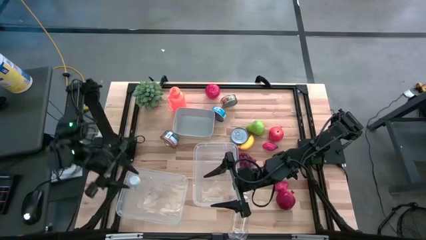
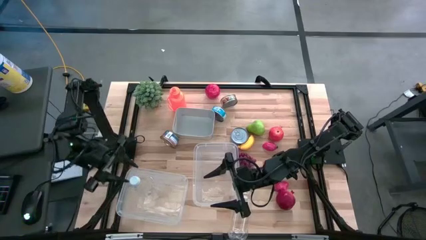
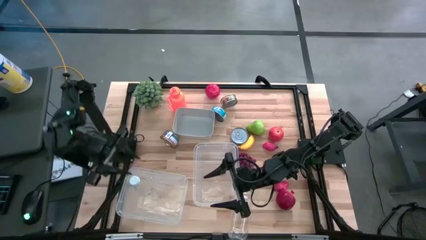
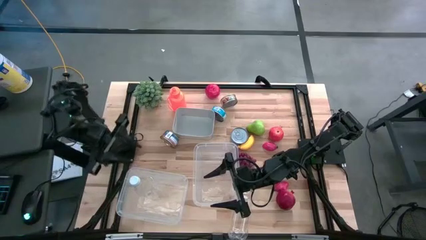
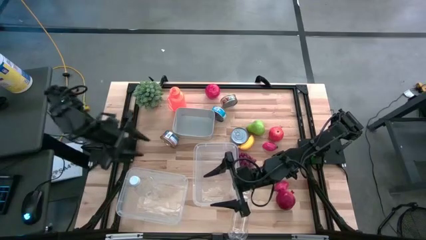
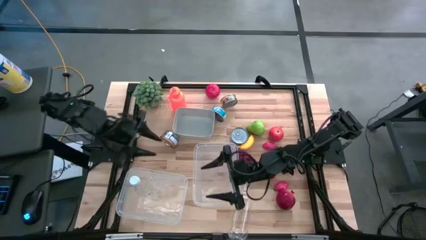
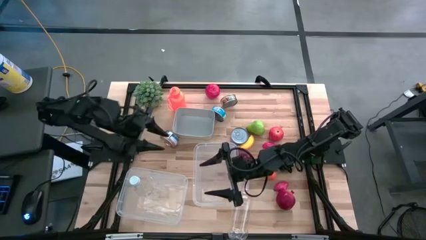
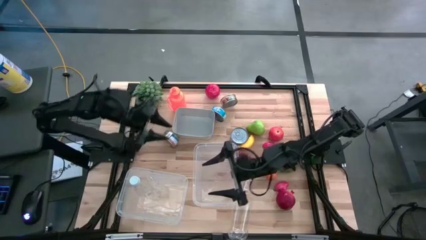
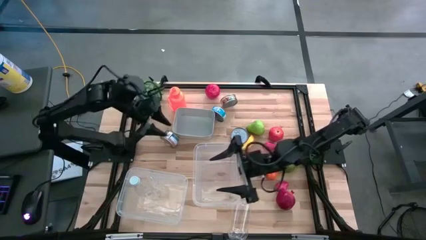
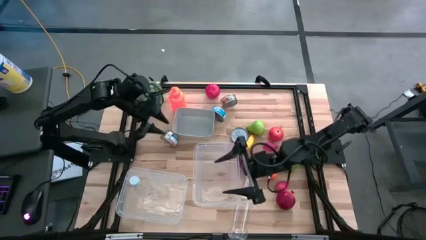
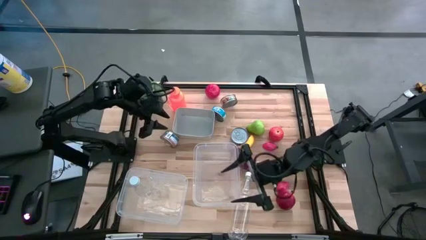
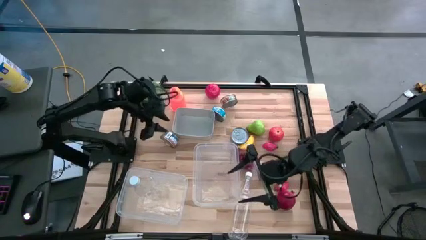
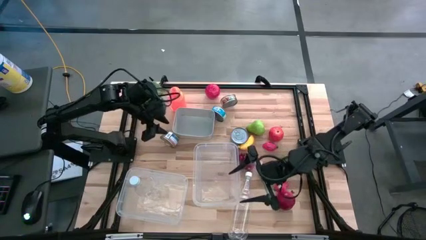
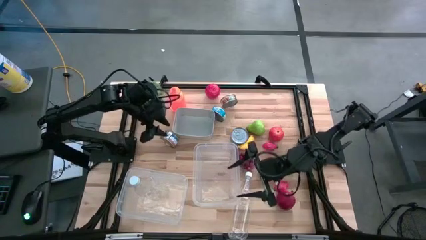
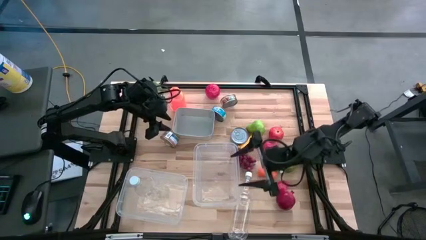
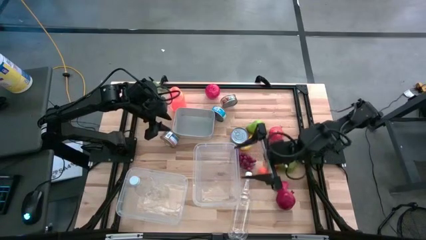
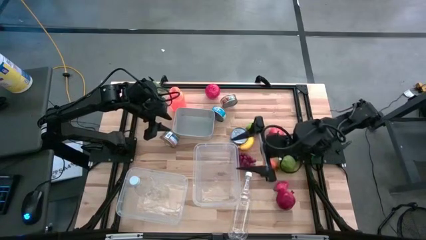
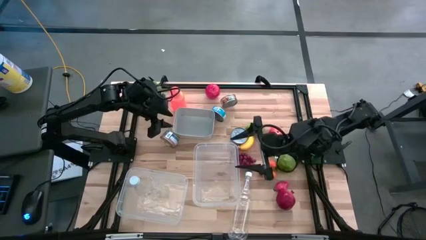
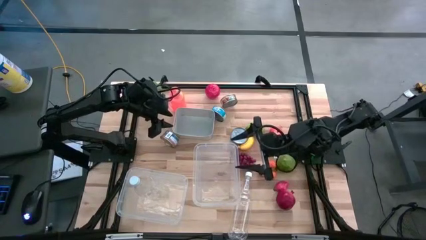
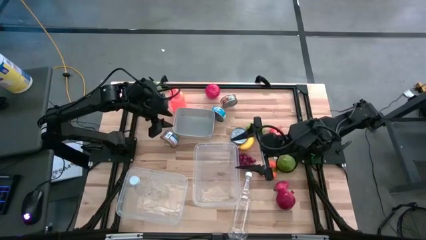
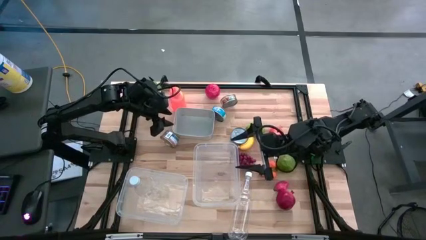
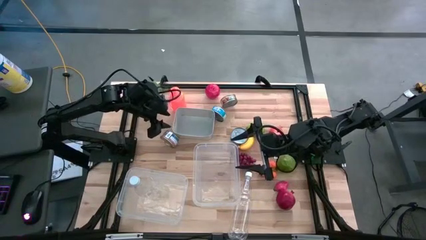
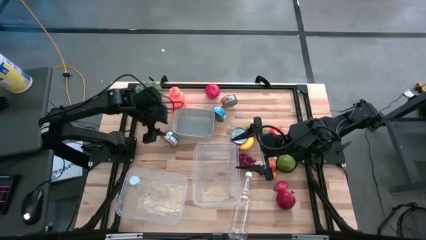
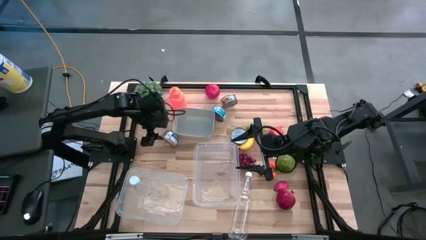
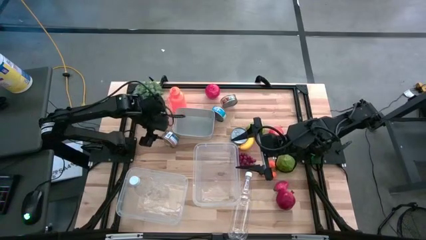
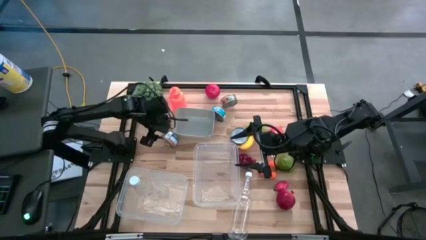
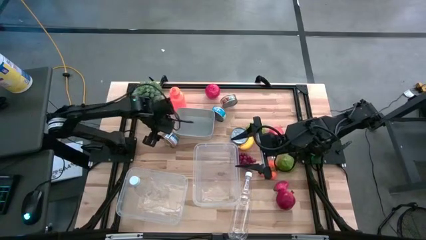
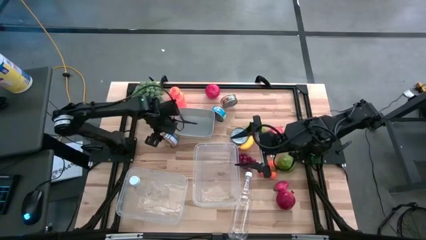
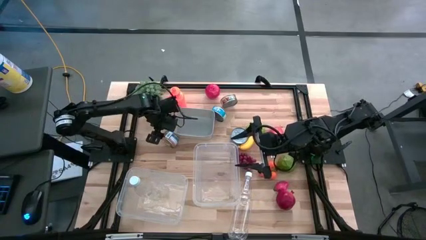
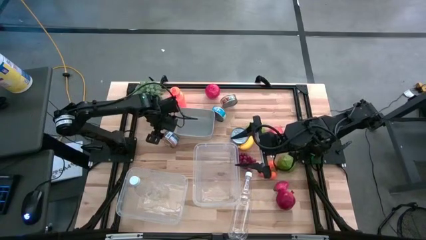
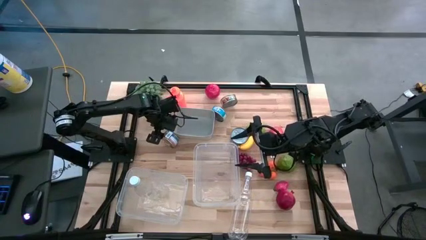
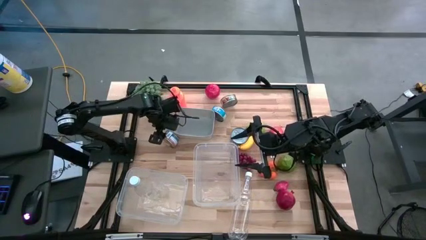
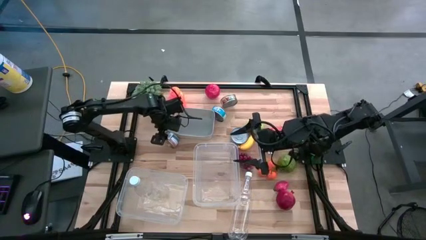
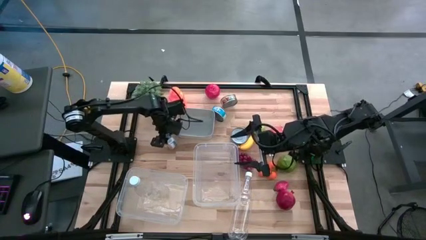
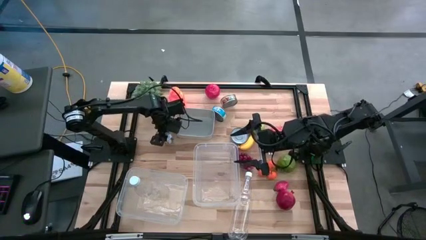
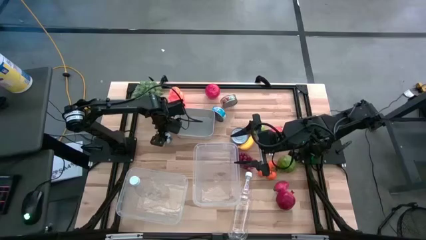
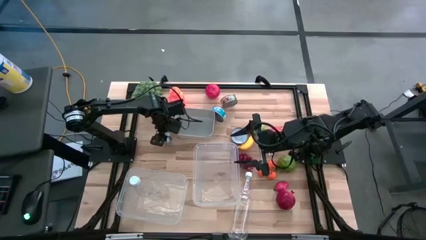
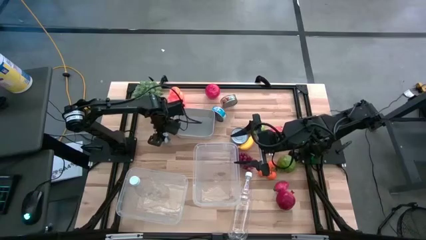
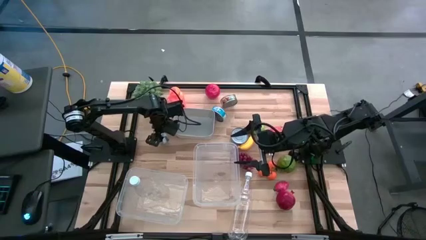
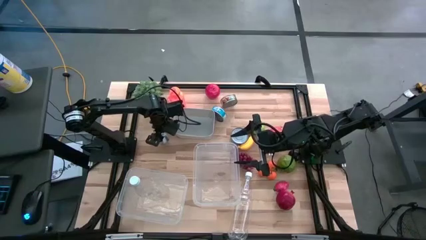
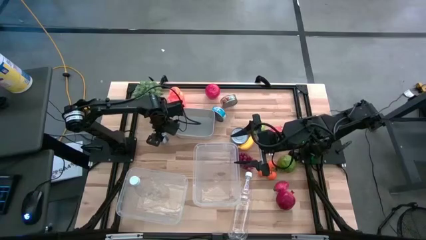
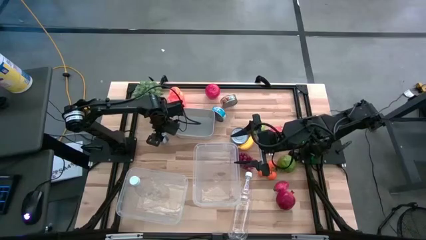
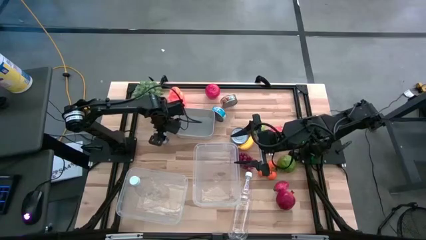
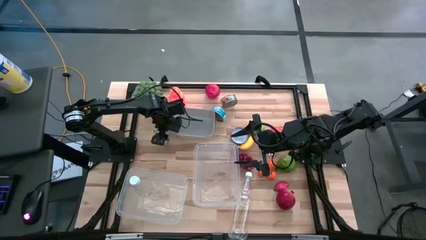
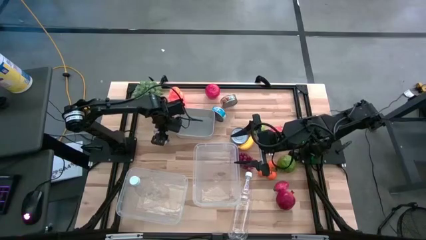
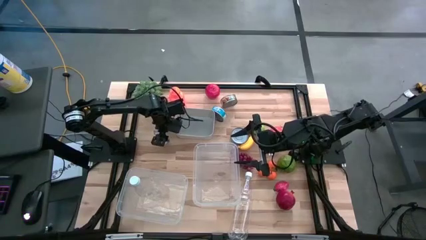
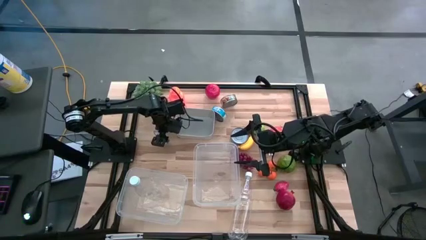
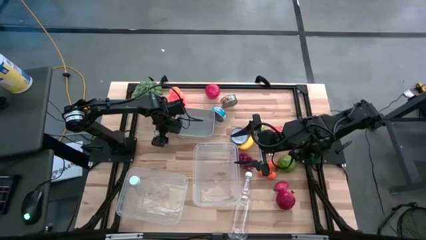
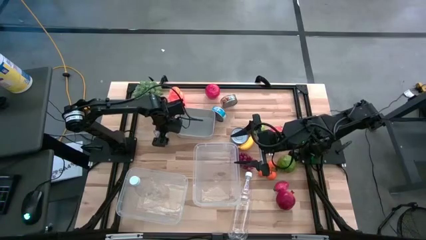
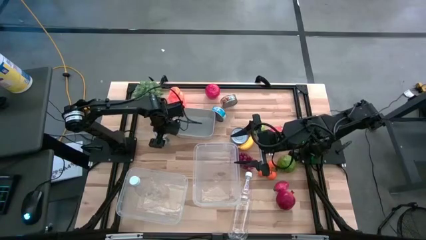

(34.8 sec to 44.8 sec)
Task: Pick & Place Food Item
Put the pink tuna can into the gray bin

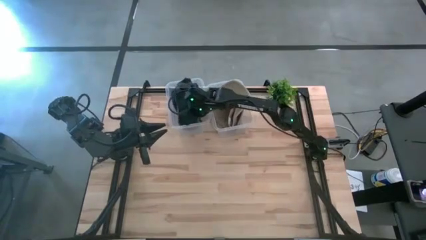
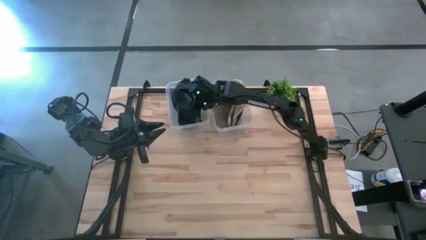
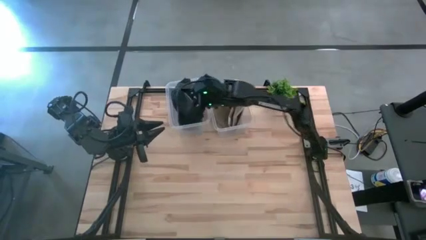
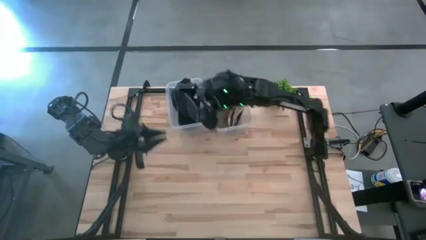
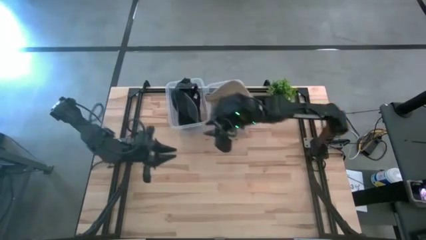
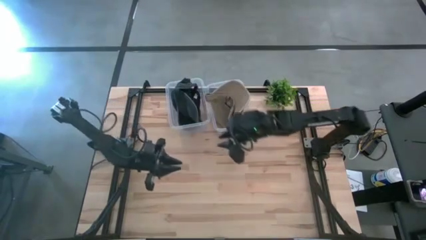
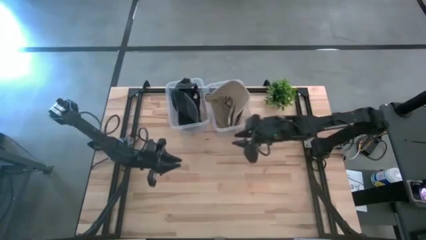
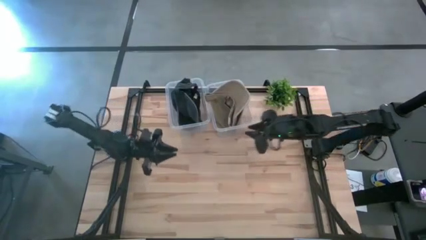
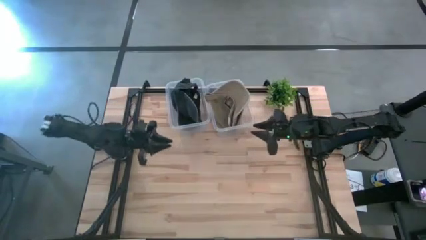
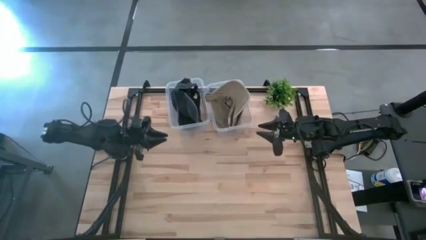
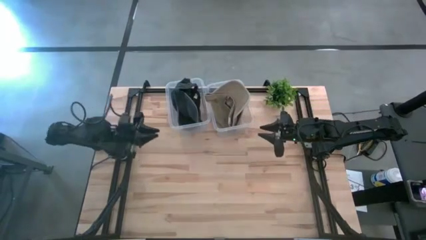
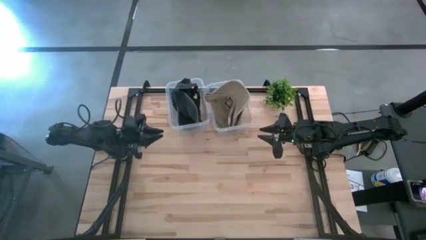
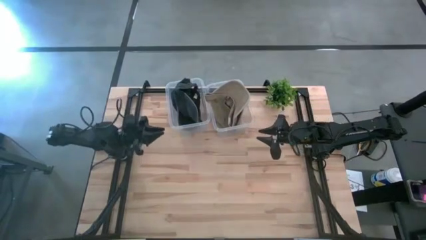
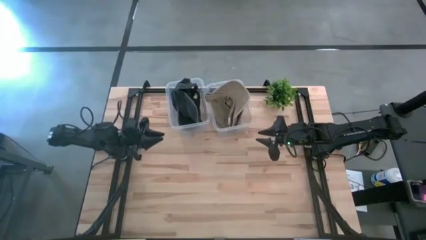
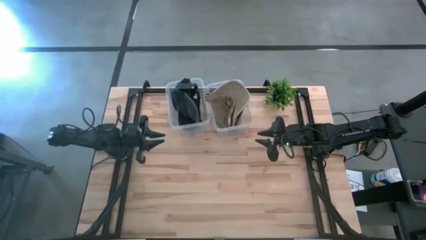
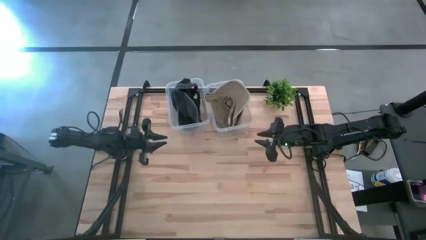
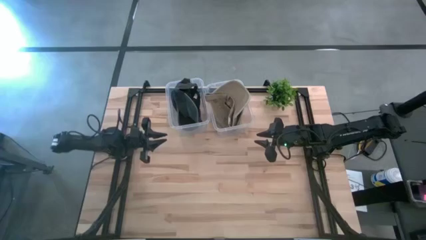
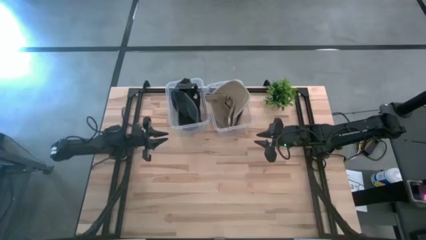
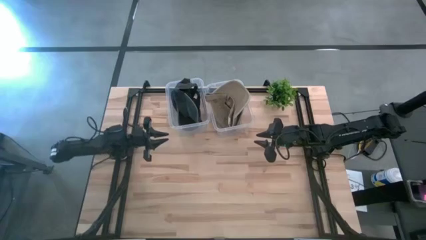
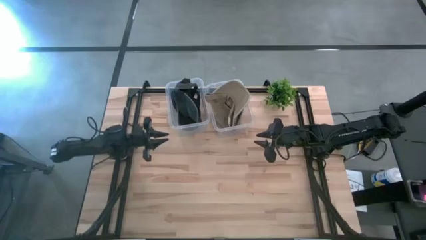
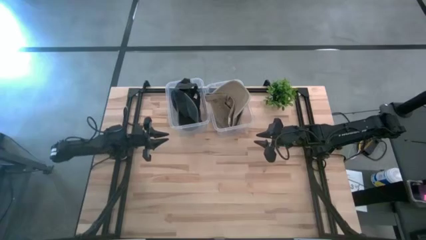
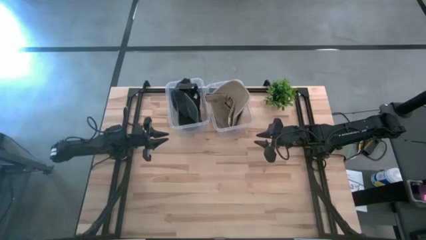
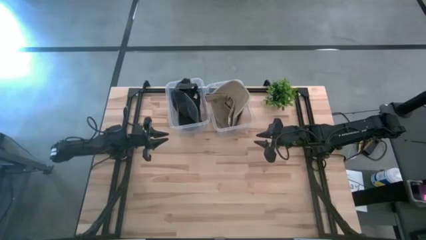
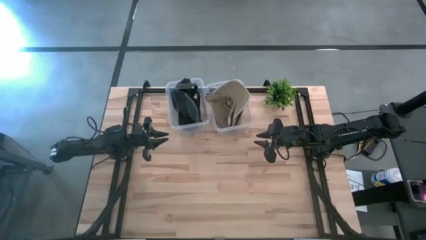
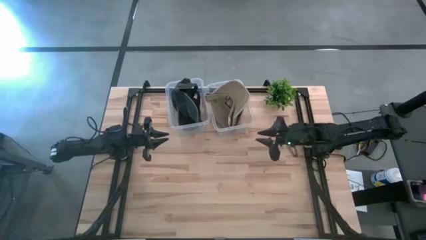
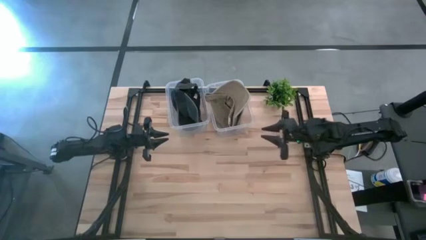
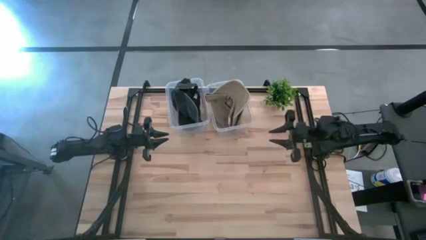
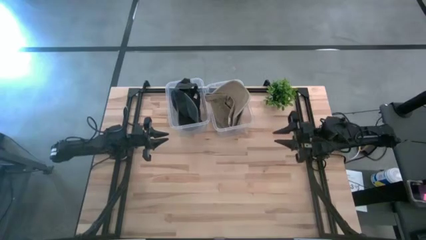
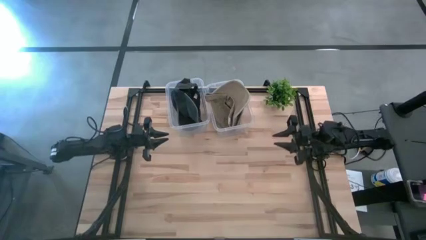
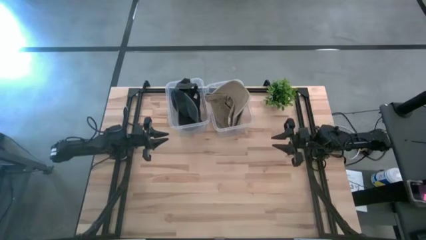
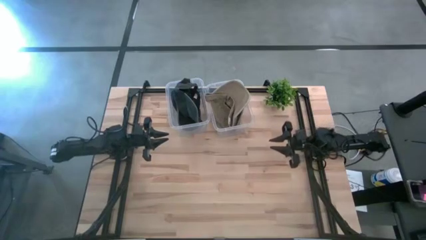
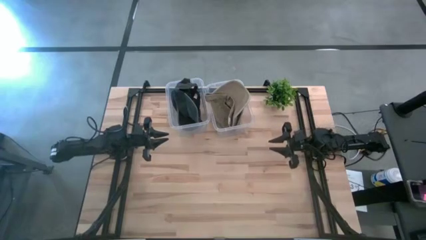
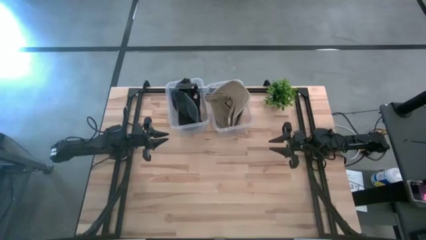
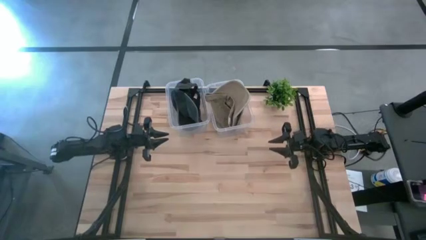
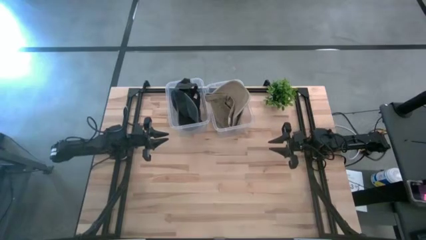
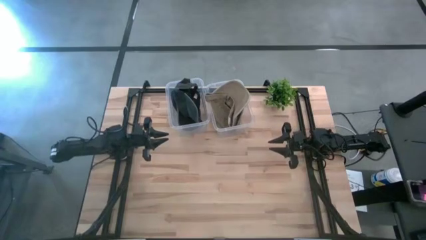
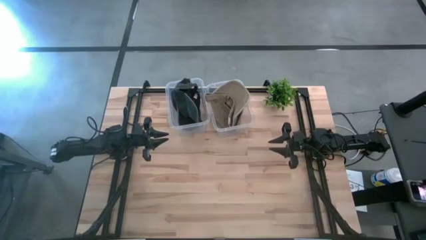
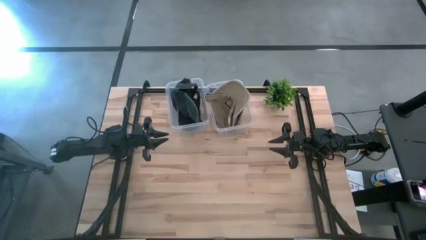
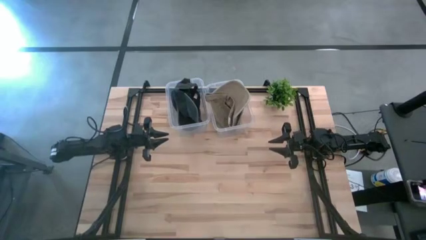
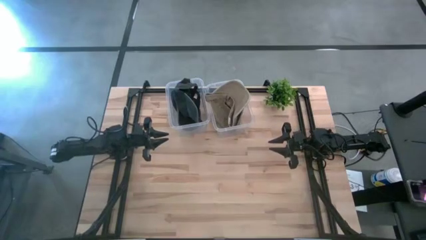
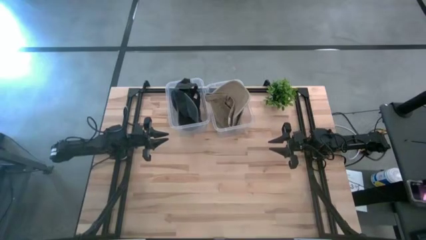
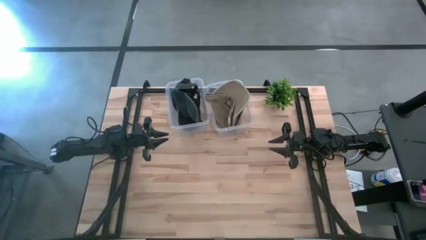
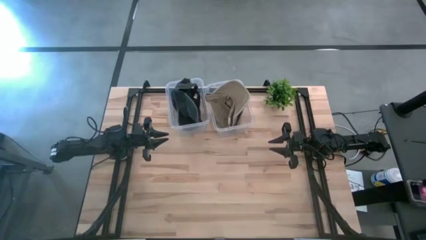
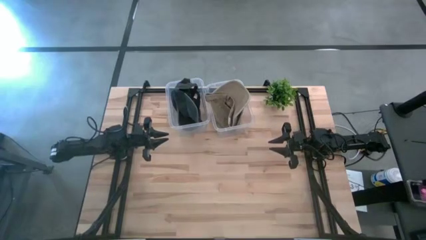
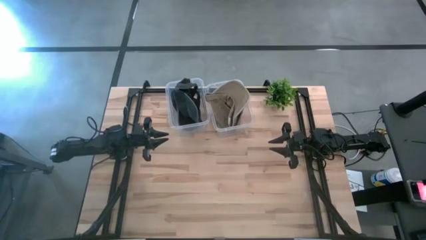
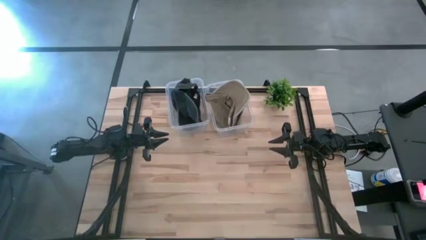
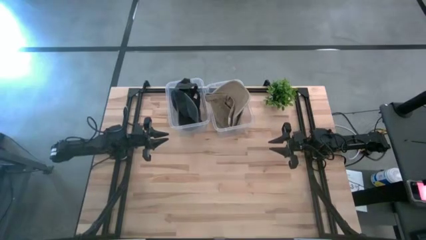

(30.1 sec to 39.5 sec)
Task: Pick & Place hat
Return to Home Position
